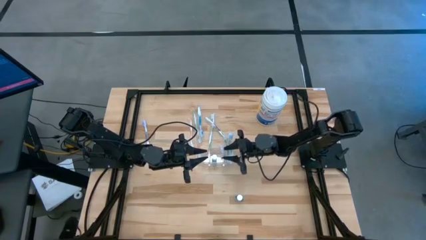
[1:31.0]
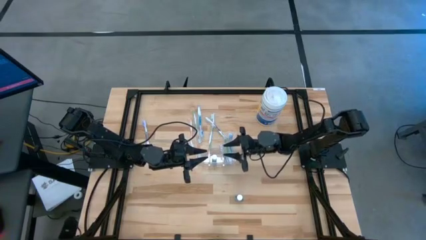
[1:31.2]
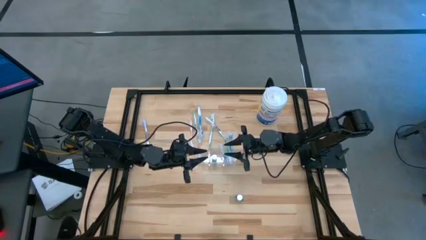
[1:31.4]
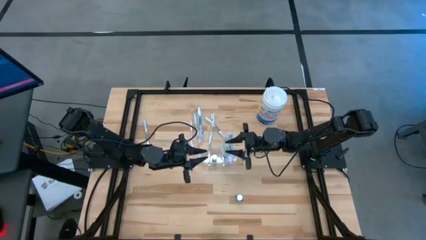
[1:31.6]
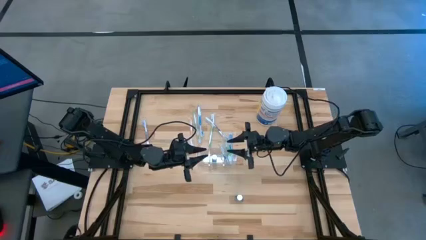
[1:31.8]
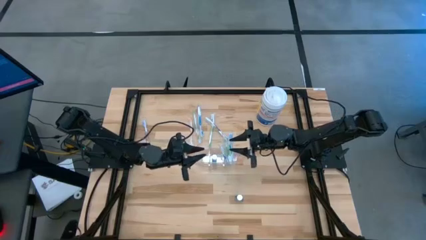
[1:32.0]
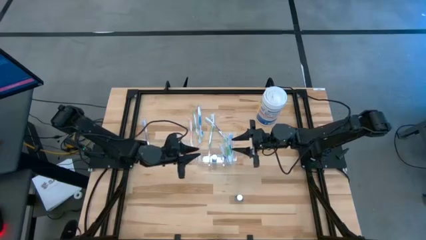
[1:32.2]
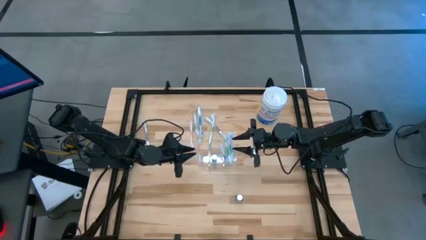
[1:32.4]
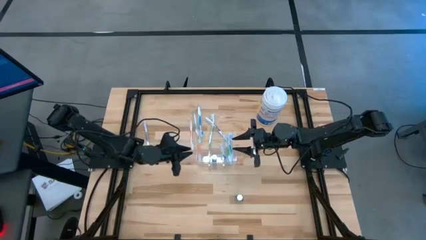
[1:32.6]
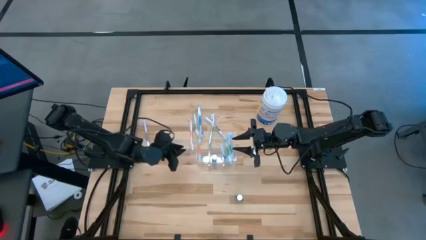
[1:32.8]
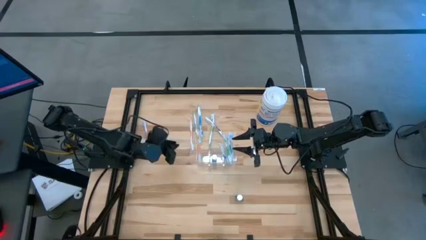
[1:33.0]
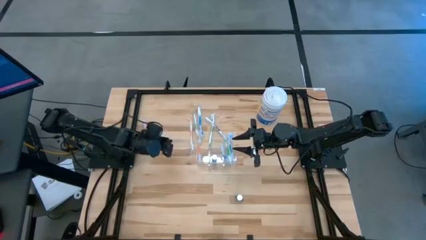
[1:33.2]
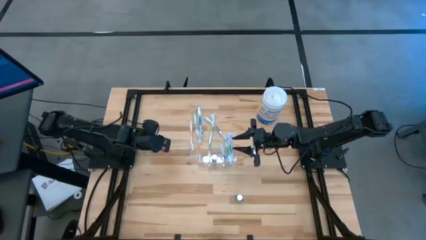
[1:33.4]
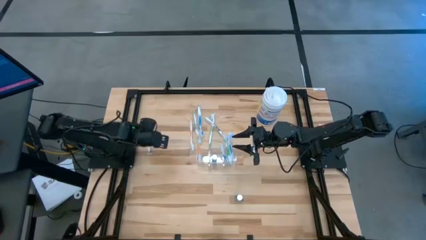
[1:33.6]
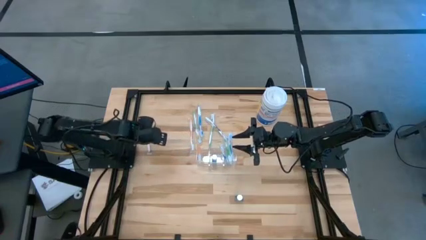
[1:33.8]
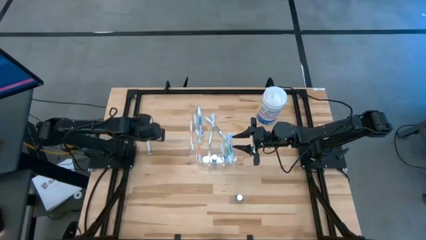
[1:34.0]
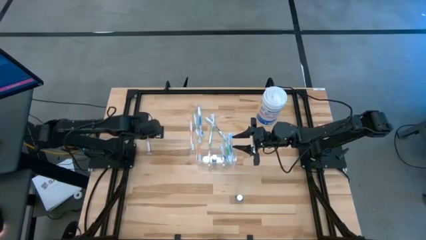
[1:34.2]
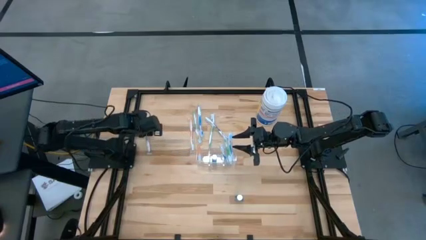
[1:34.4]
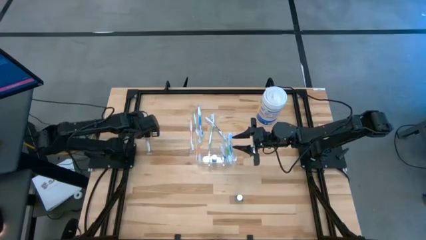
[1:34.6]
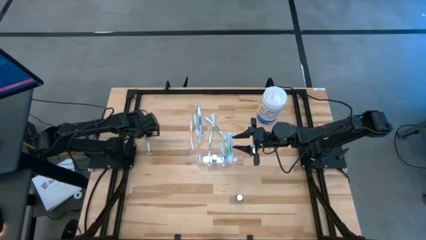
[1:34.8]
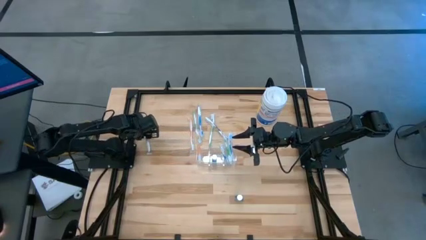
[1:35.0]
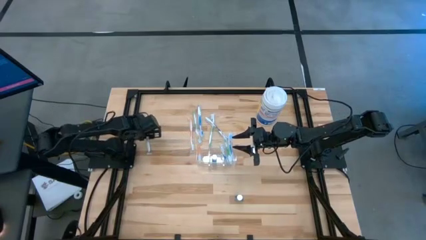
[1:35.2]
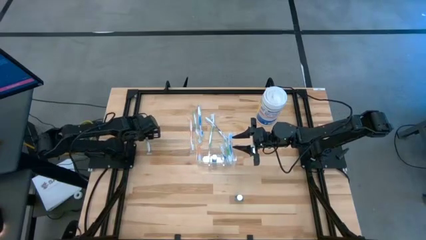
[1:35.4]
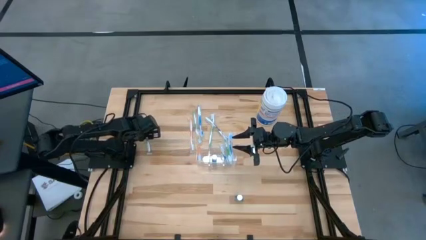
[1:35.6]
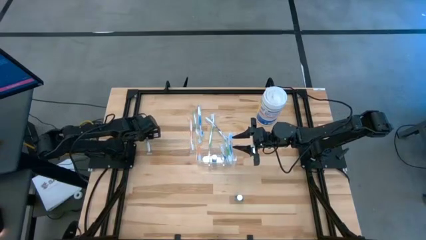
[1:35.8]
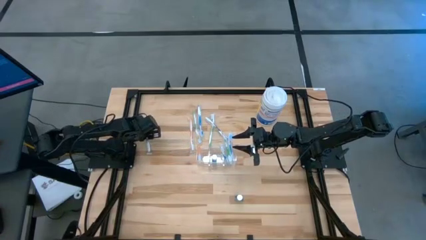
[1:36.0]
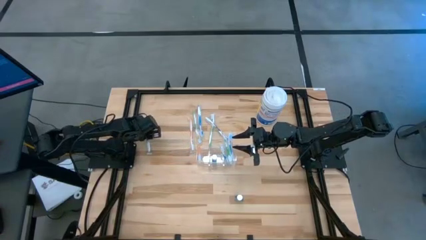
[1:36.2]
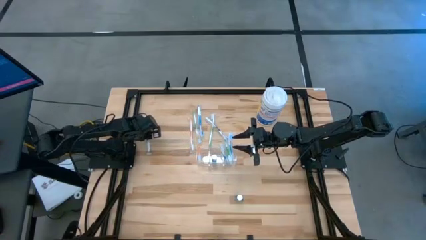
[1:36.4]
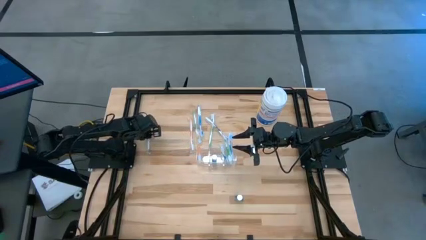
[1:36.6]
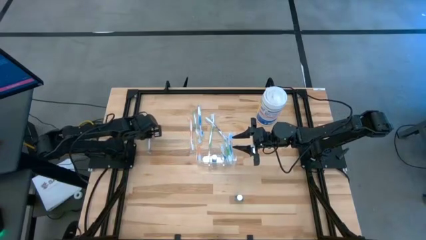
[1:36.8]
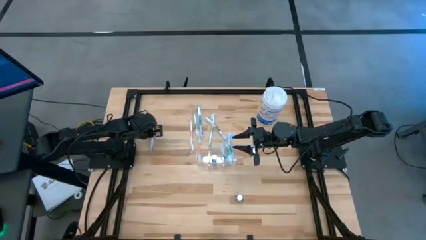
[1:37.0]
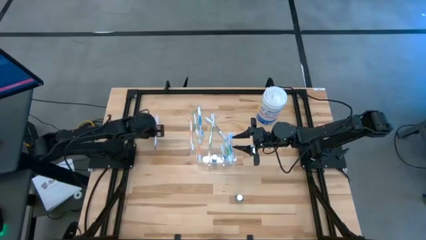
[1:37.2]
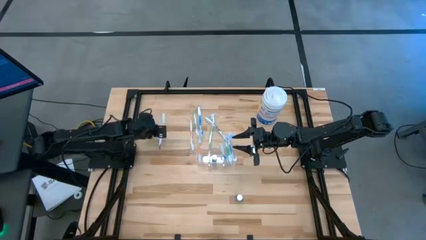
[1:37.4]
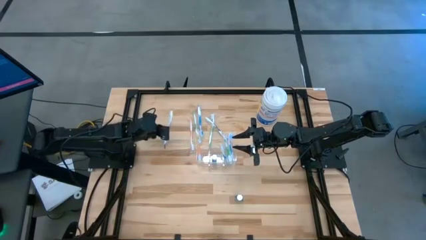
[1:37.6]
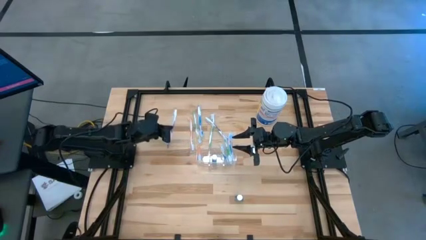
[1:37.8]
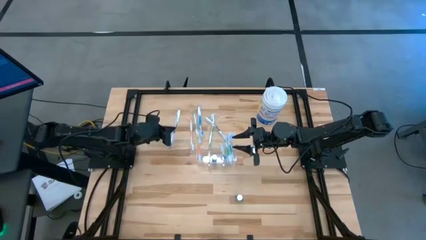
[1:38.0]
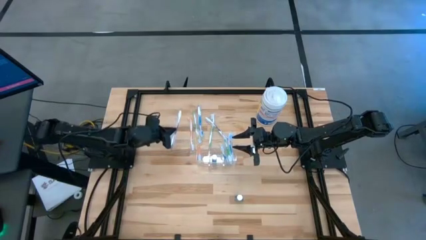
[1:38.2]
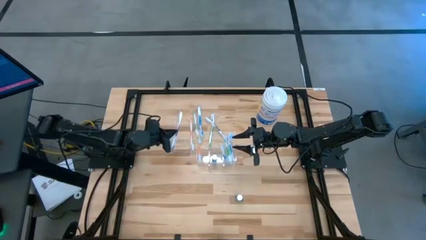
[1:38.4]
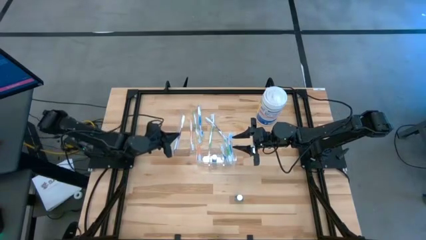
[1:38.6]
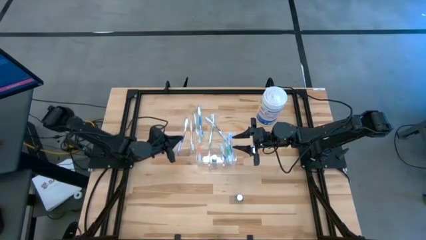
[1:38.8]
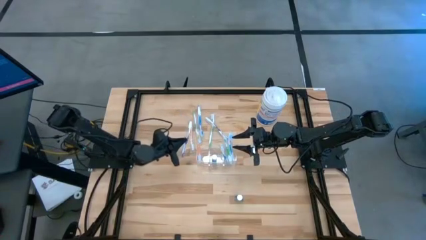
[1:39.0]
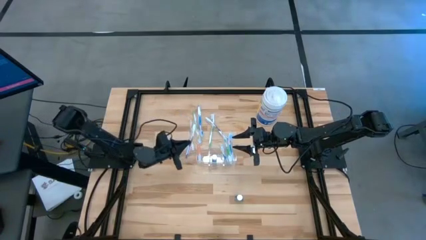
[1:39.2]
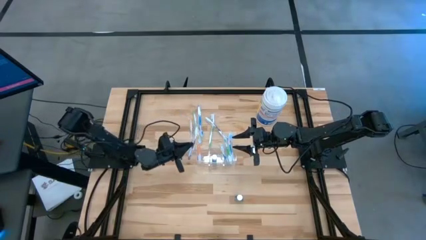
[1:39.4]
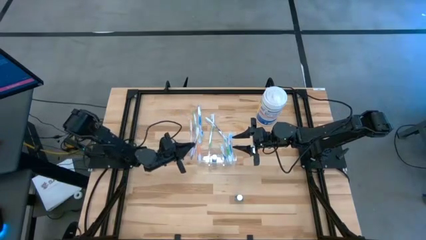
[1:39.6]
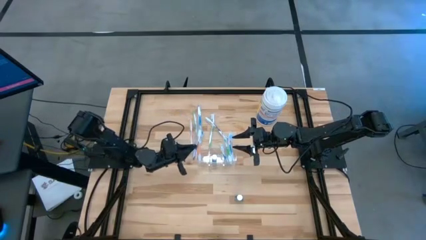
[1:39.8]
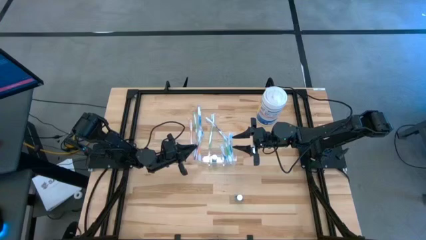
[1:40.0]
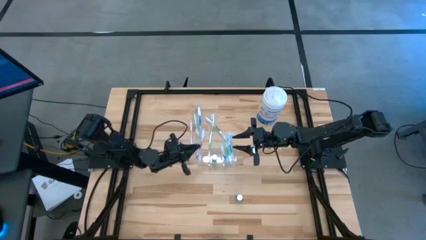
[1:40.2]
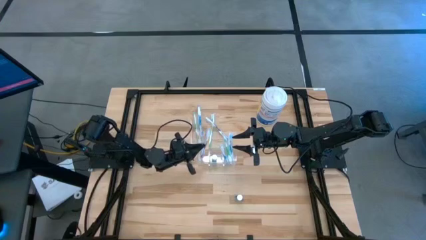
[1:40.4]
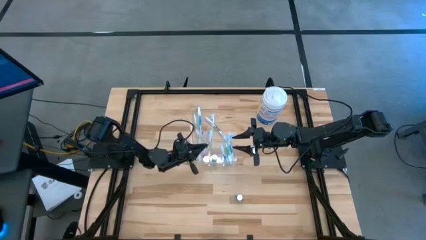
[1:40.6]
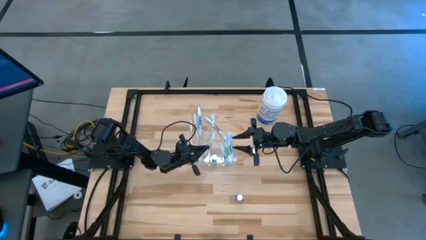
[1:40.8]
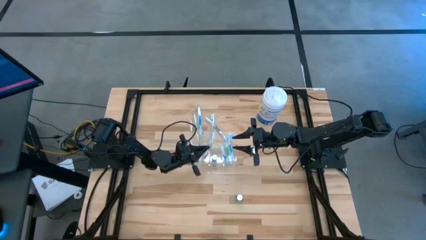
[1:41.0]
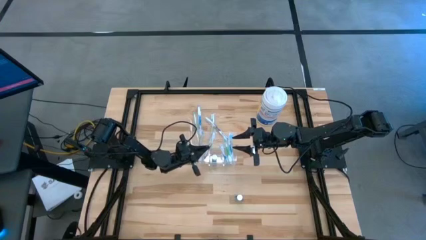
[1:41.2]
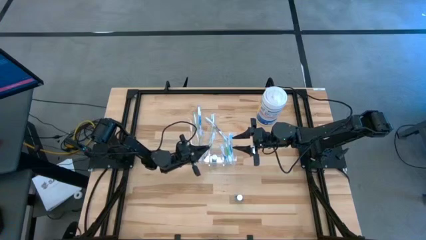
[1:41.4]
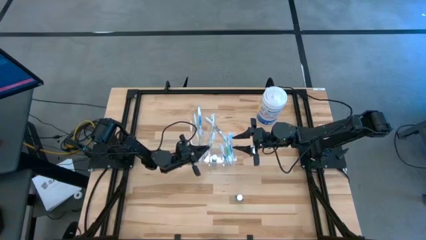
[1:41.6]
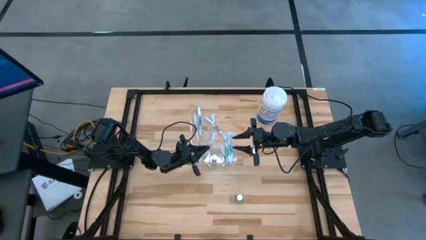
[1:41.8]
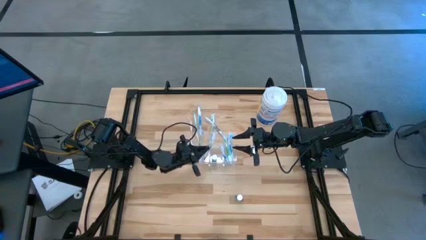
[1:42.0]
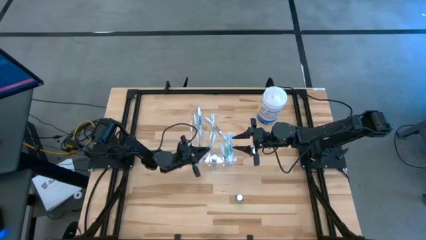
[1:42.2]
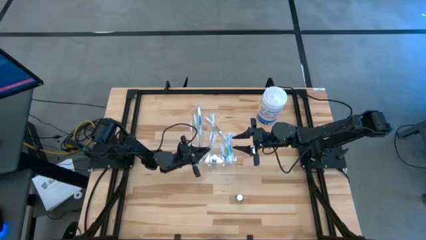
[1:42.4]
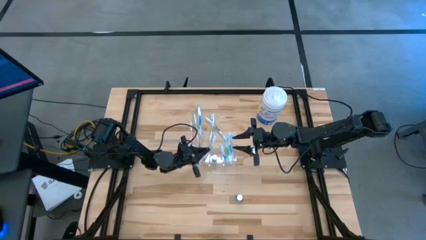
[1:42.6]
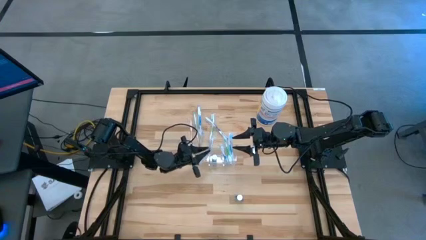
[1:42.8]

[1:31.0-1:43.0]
Task: Pick & Place toothbrushing station
Put the left purple toothbrush into the transparent organizer

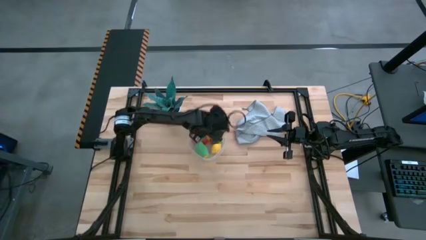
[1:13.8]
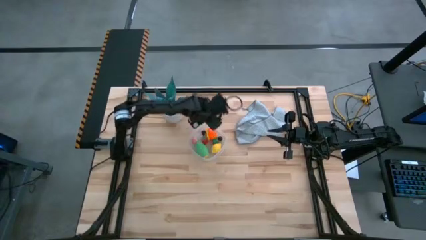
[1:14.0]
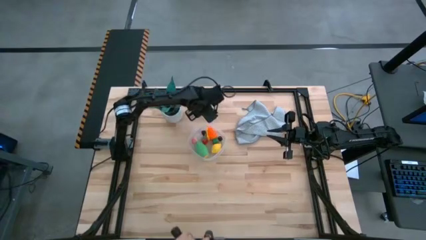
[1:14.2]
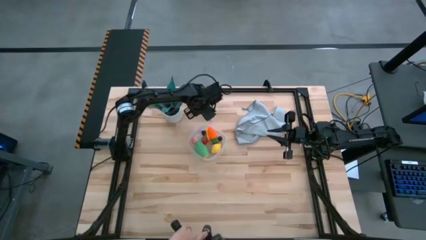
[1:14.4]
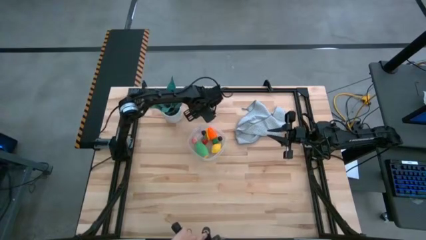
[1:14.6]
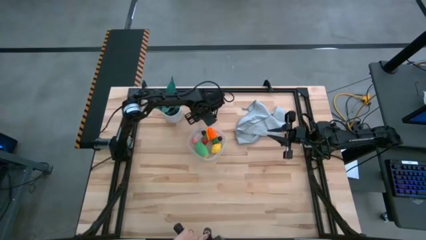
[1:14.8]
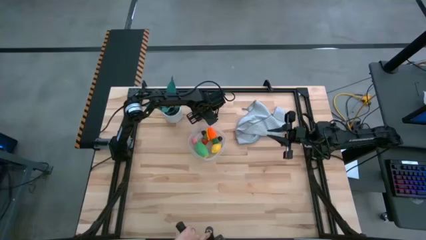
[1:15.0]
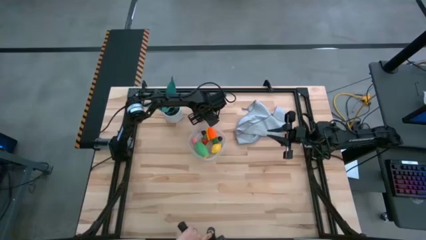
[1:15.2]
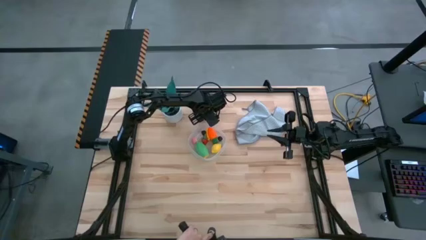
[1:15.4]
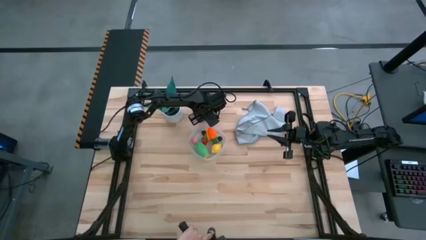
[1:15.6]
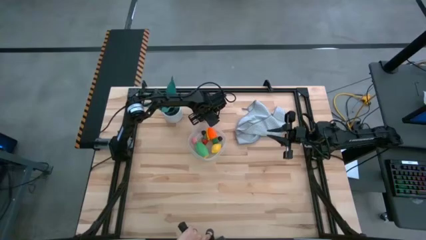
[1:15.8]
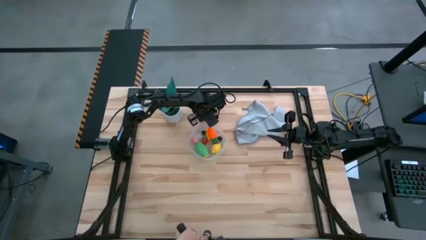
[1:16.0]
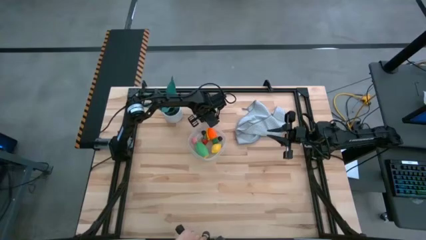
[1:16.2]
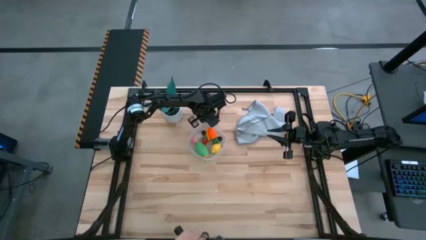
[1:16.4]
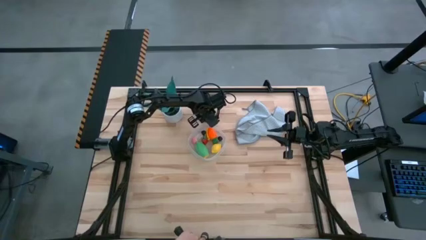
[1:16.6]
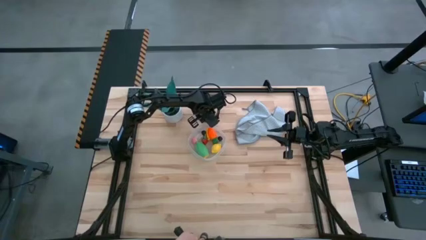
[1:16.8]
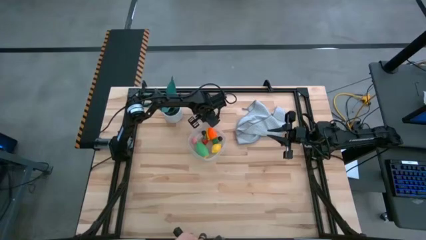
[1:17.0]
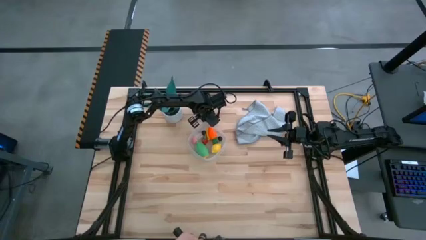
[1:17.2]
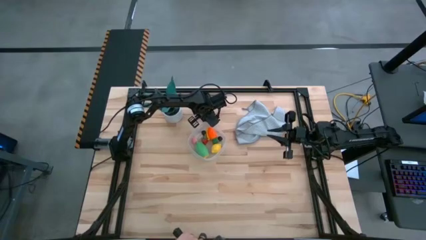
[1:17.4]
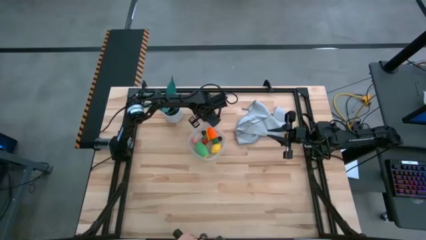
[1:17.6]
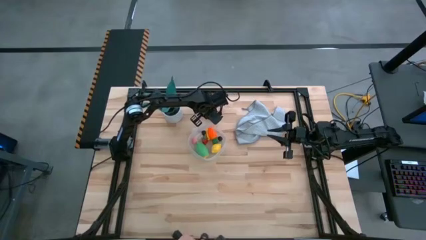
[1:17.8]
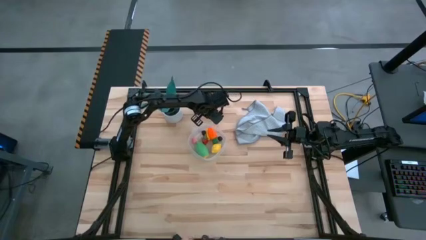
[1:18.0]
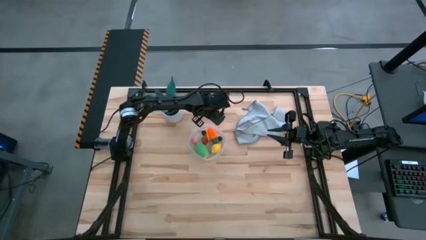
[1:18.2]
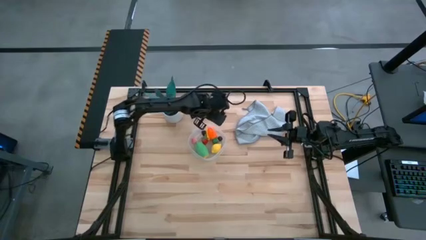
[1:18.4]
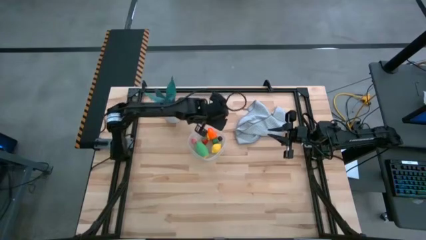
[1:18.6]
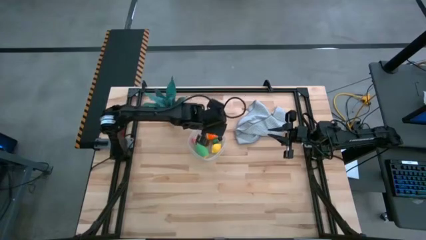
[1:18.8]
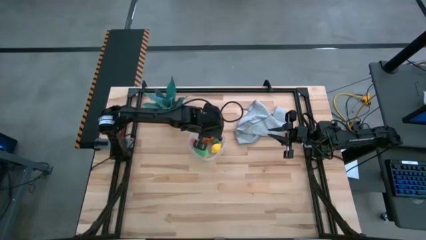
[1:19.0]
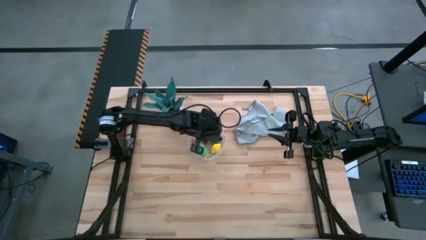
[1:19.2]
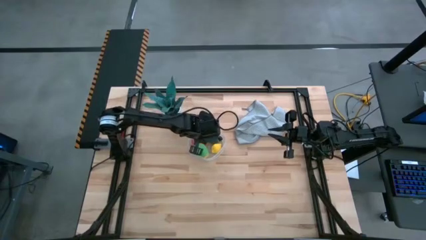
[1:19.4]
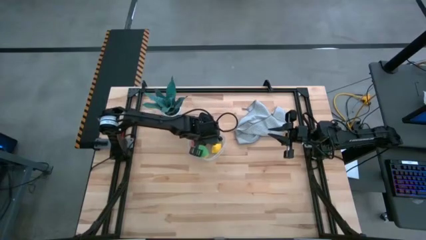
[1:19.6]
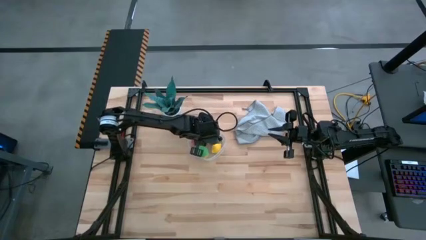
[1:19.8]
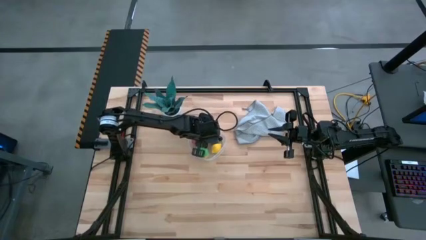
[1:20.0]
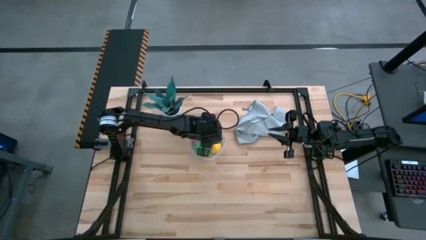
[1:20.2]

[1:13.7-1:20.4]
Task: Pick and placing Produce into tupperware
Put the red cherry into the transparent bin
